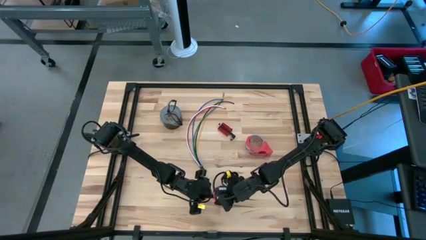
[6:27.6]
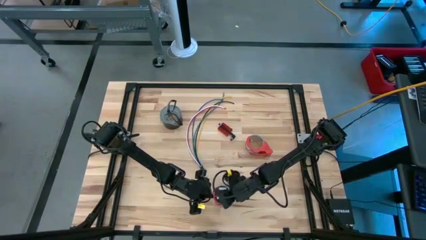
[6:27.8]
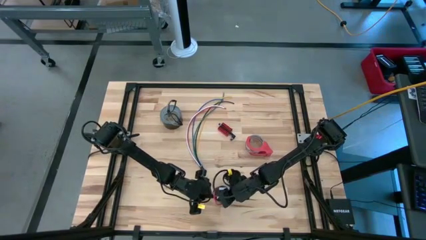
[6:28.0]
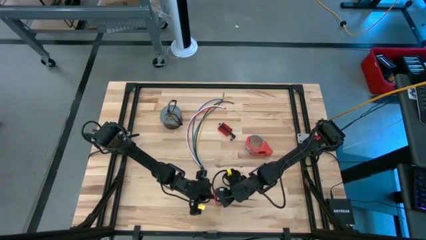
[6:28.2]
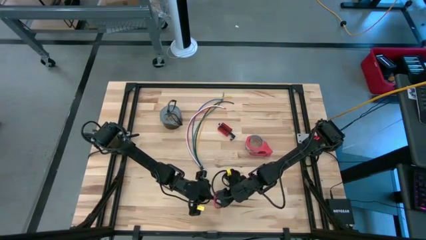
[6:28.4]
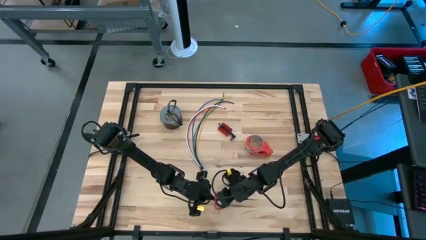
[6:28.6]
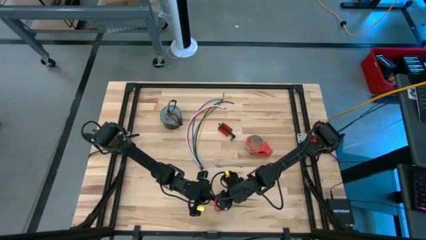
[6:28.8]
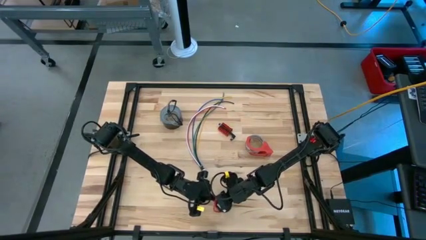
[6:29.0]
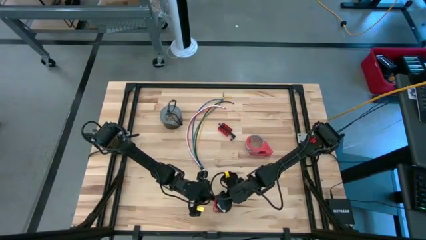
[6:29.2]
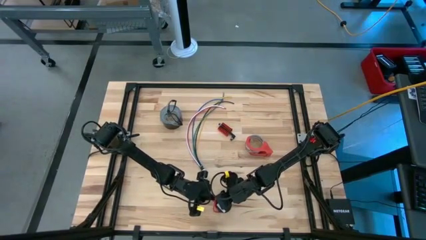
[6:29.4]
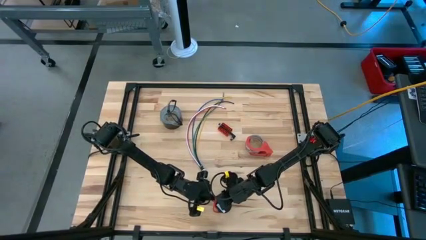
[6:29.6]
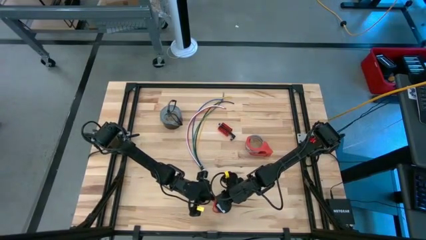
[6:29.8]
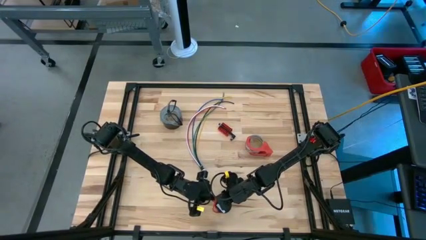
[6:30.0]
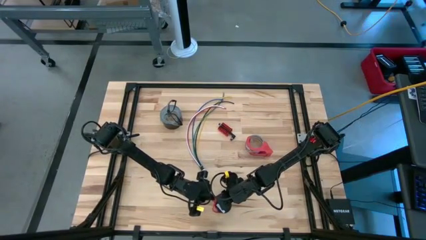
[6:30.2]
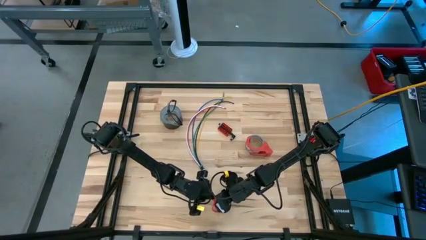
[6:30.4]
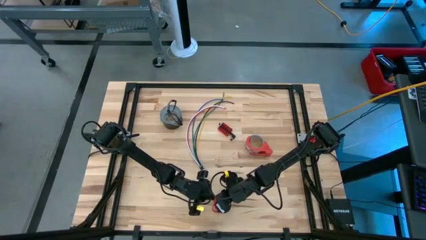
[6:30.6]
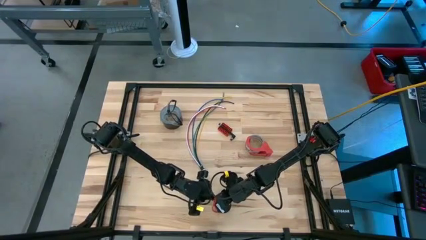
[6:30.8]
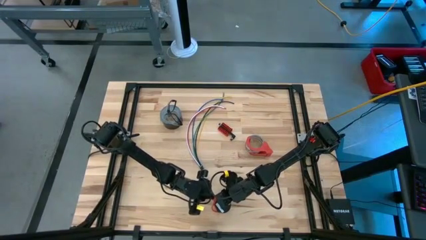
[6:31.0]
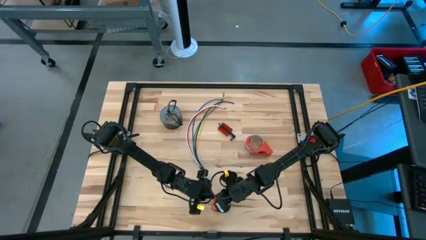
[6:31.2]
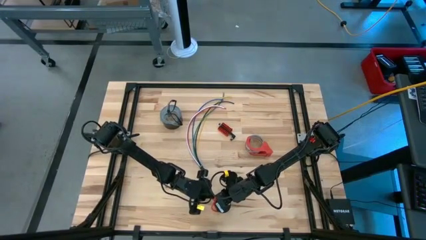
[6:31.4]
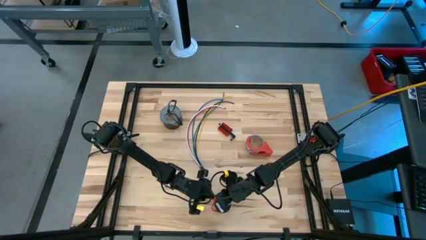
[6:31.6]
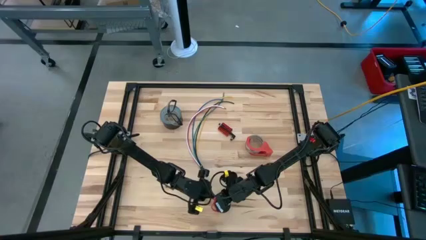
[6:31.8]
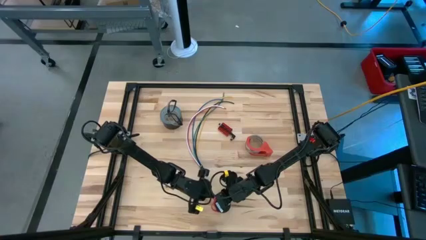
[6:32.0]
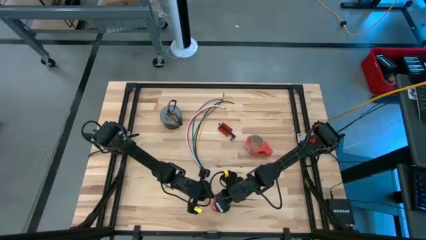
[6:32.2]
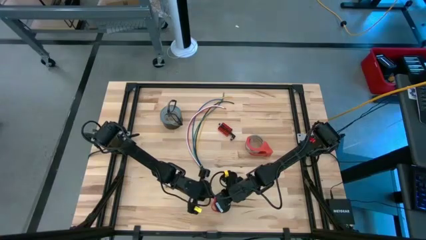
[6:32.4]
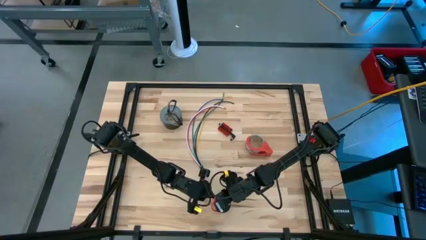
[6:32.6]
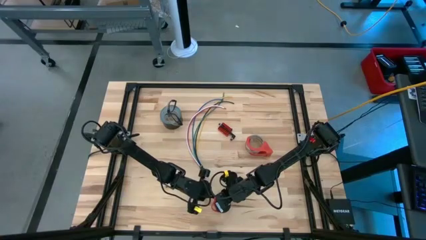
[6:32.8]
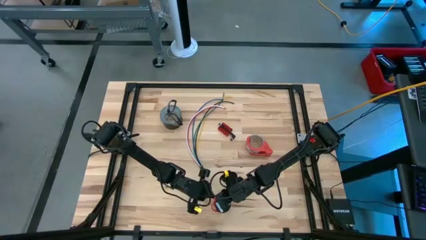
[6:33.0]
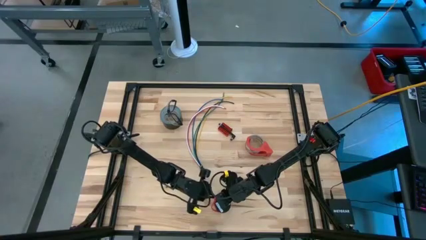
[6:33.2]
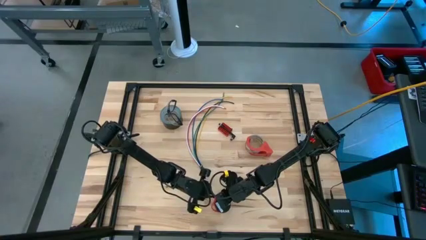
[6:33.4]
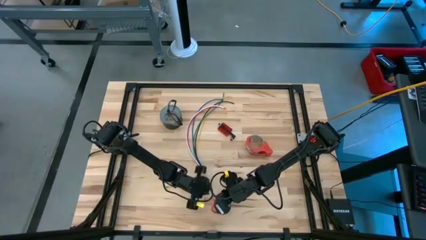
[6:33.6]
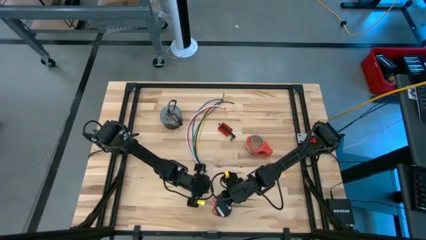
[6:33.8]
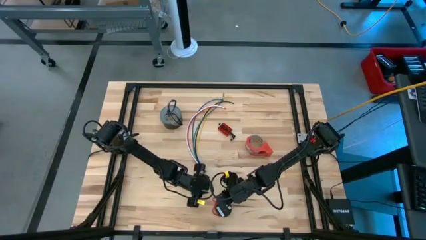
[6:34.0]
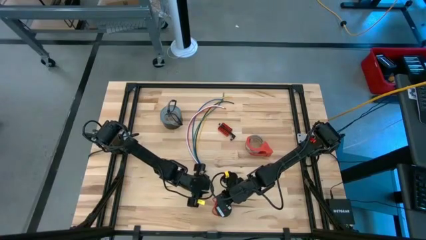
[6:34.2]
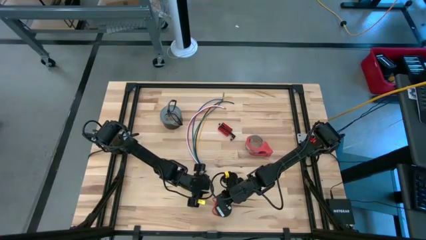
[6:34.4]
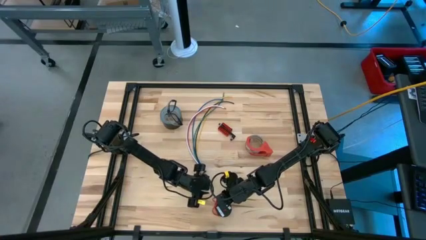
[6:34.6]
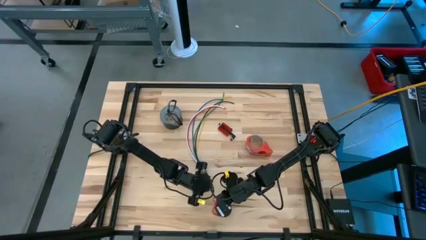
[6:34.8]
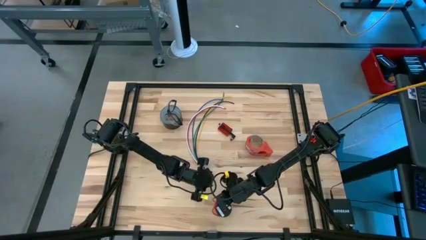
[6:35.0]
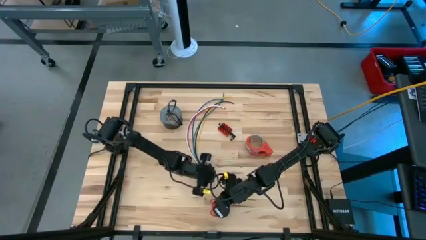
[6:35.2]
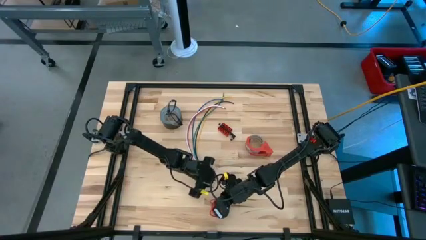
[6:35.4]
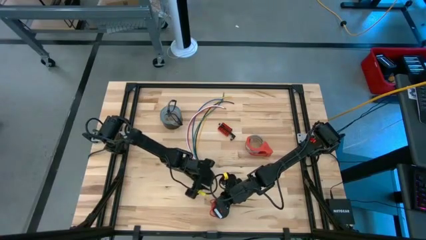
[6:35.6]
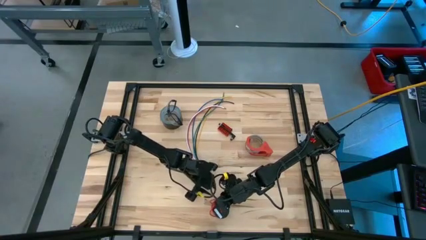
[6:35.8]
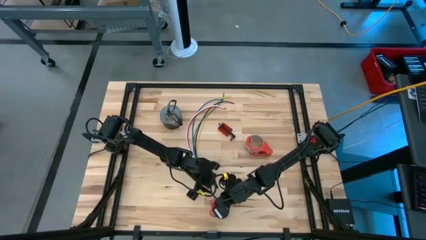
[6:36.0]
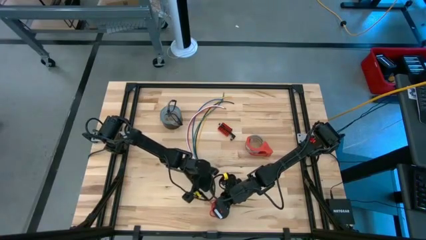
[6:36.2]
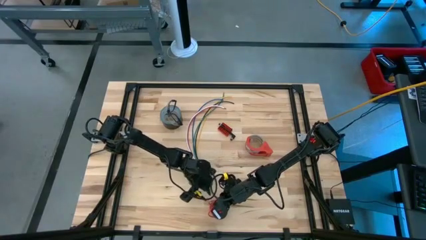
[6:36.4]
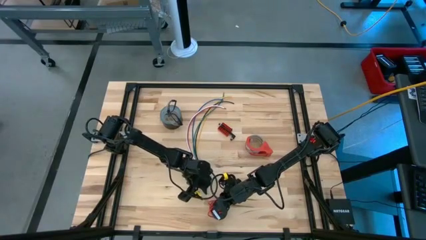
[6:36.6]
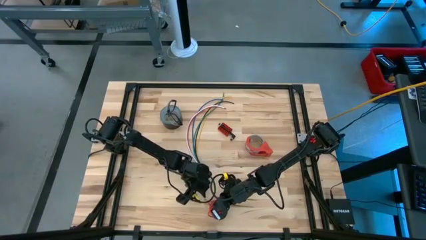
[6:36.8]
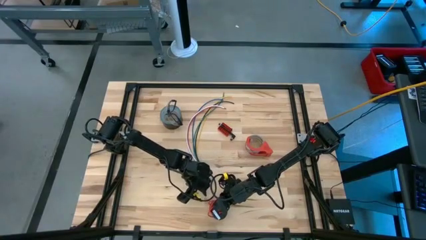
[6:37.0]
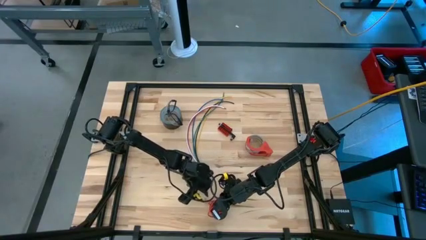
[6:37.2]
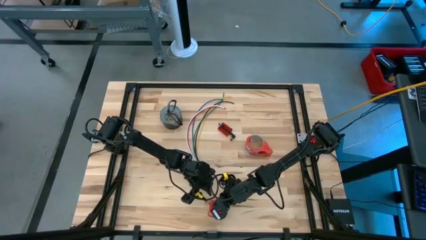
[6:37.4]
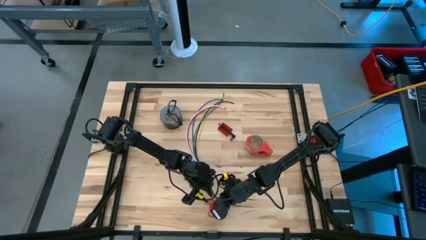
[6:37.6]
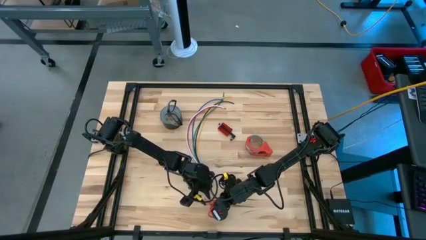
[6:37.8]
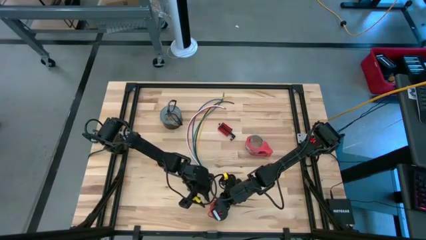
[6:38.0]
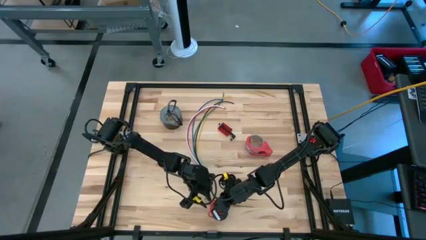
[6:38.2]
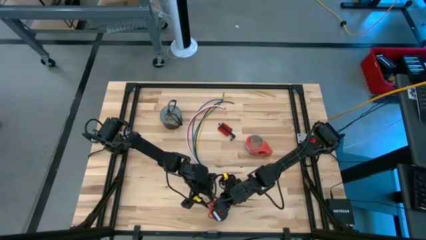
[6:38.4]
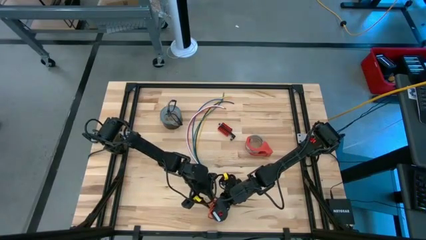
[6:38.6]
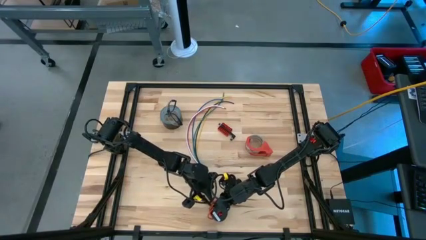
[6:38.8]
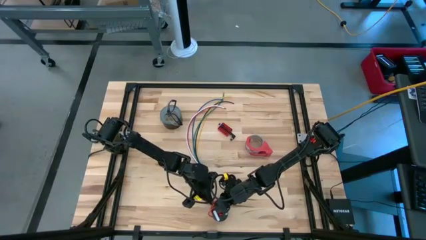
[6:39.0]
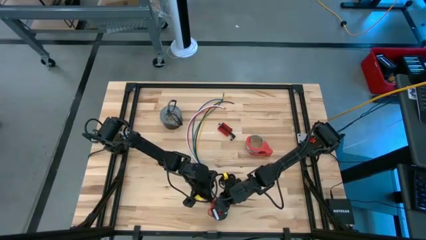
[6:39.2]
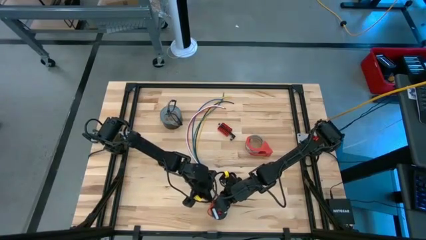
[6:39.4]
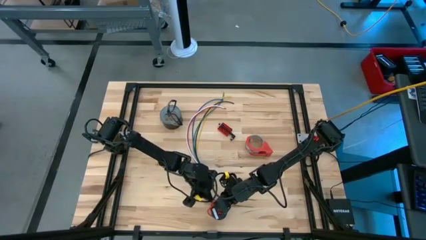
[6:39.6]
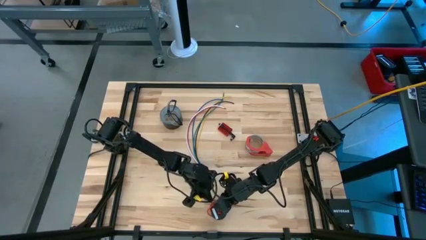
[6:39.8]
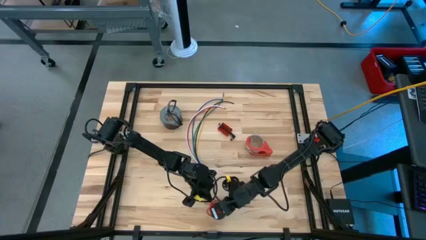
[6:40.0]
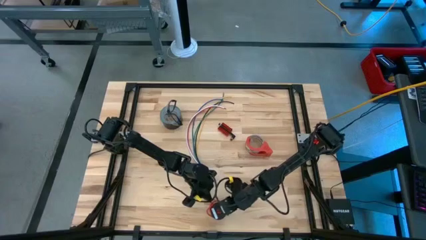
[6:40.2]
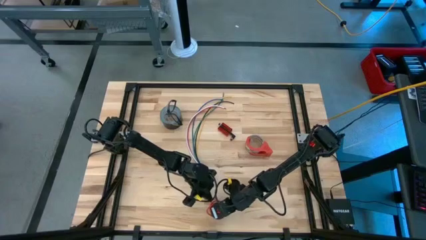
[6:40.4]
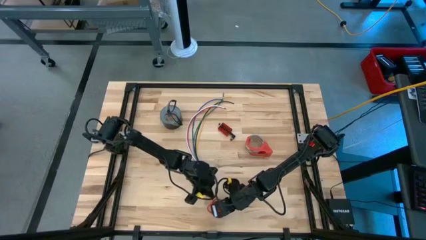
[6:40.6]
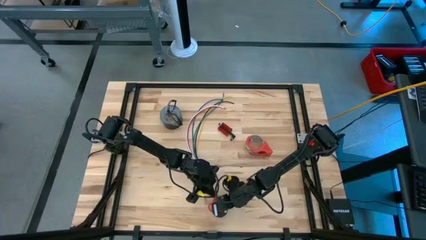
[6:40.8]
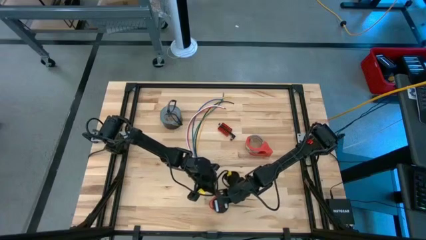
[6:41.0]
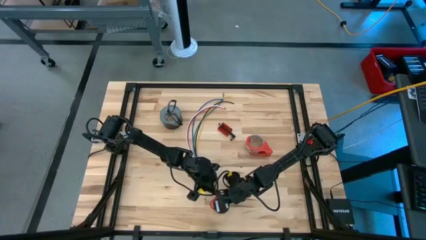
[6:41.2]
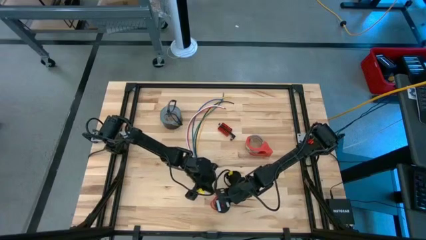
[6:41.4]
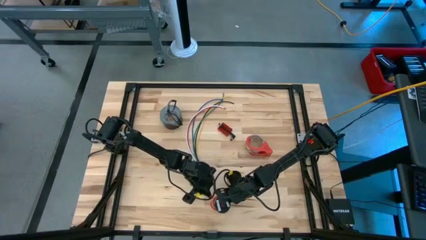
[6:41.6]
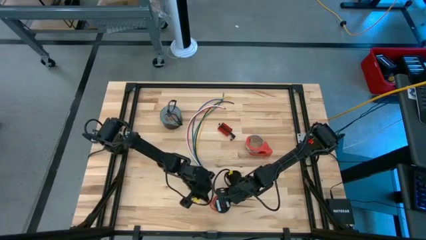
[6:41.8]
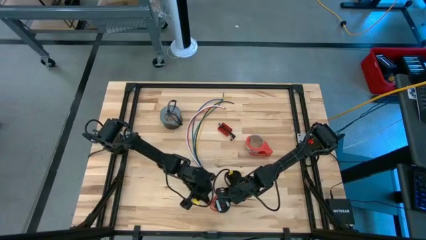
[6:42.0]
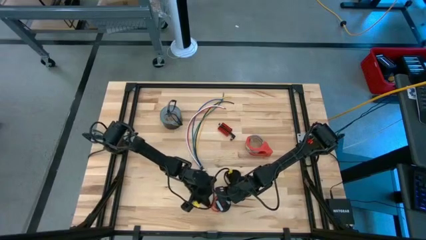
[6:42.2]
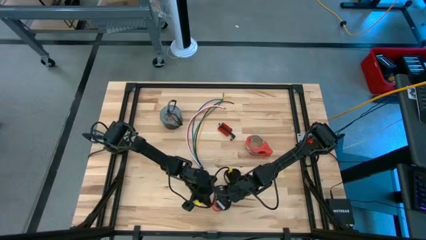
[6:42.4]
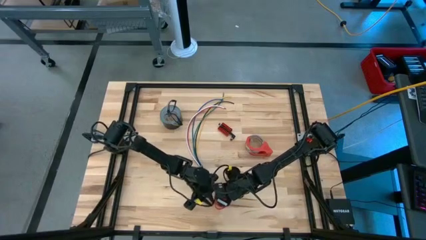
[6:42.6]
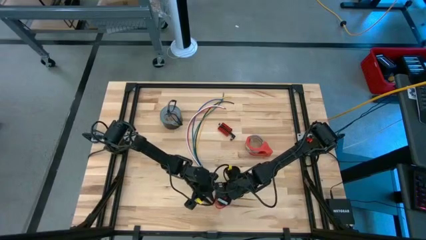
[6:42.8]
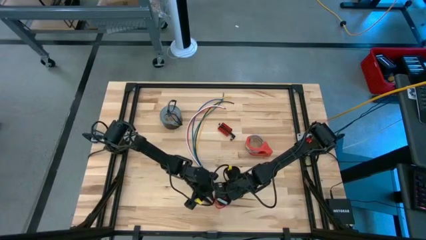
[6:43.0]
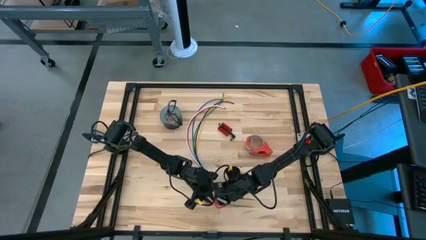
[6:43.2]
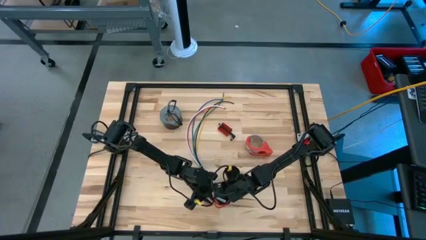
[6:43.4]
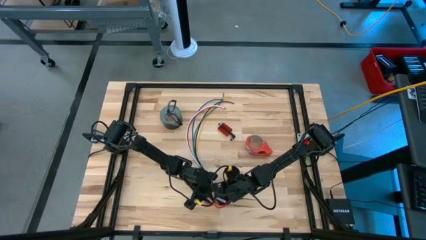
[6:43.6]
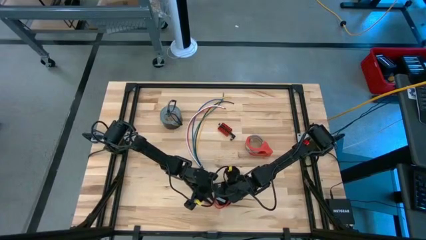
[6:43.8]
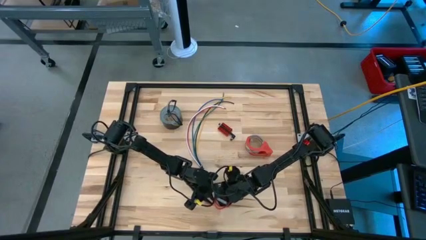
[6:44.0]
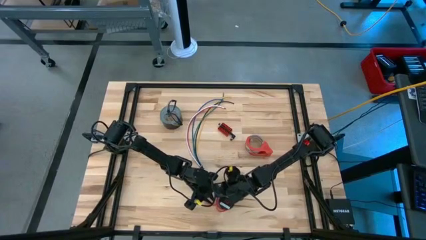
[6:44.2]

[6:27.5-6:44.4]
Task: Coil cords
Coil the red wire onto the spool
